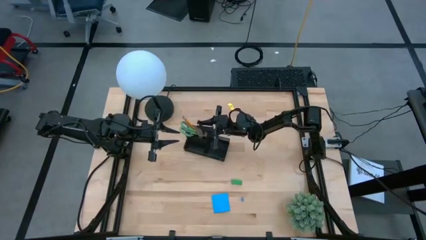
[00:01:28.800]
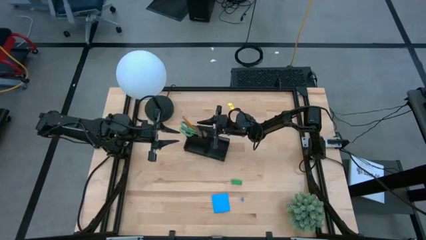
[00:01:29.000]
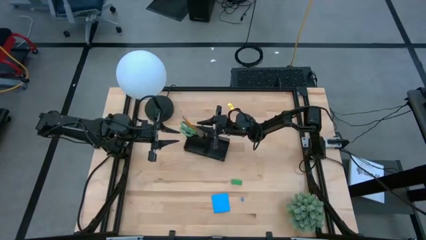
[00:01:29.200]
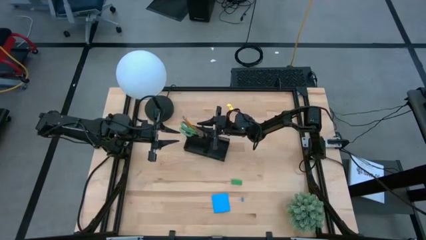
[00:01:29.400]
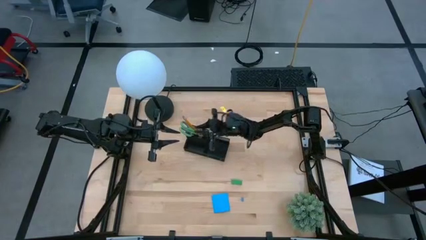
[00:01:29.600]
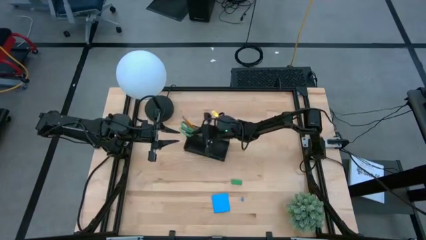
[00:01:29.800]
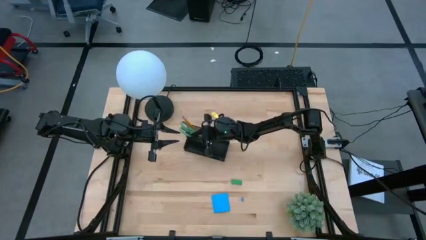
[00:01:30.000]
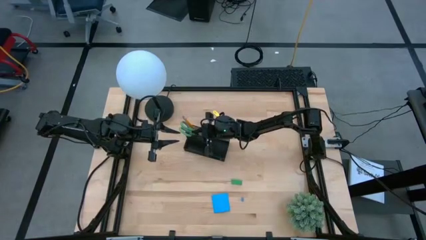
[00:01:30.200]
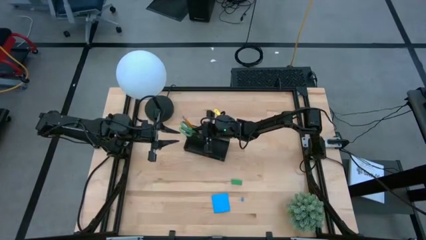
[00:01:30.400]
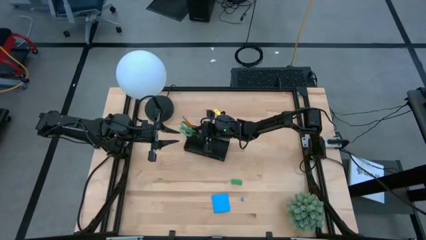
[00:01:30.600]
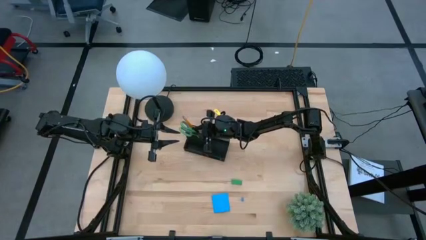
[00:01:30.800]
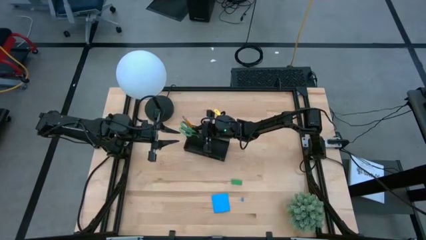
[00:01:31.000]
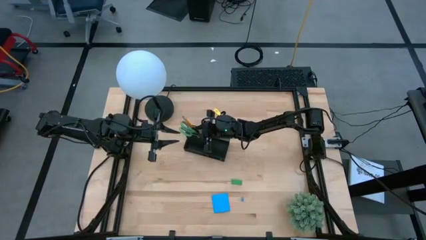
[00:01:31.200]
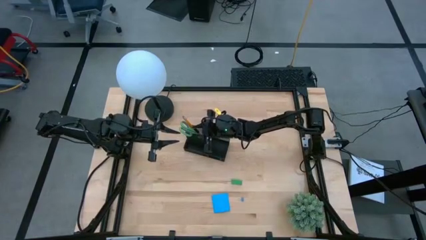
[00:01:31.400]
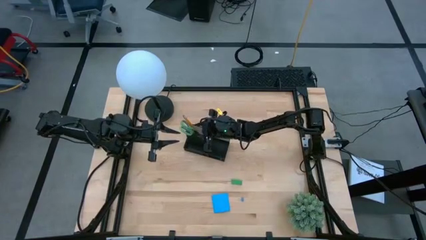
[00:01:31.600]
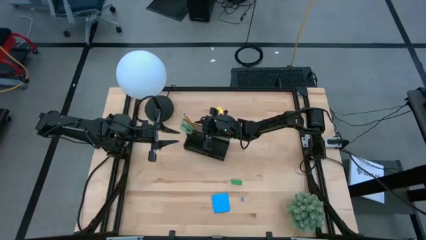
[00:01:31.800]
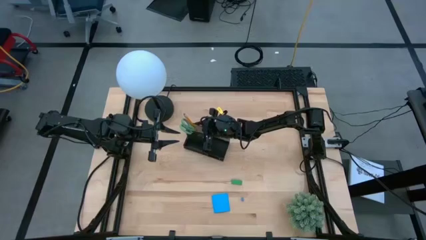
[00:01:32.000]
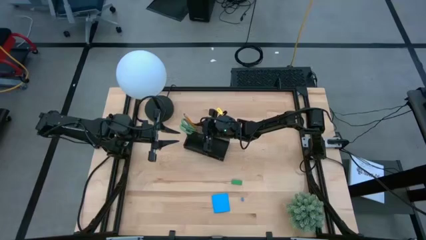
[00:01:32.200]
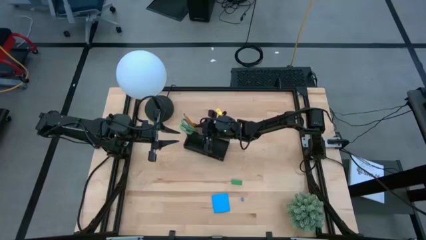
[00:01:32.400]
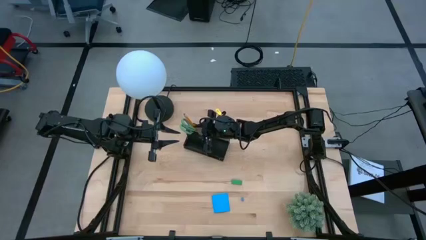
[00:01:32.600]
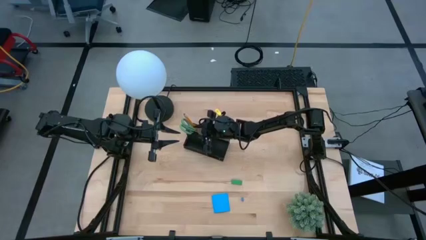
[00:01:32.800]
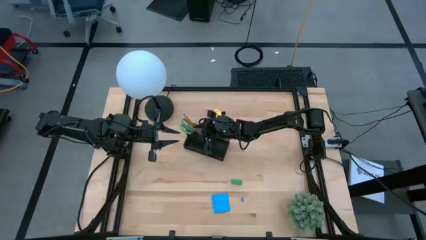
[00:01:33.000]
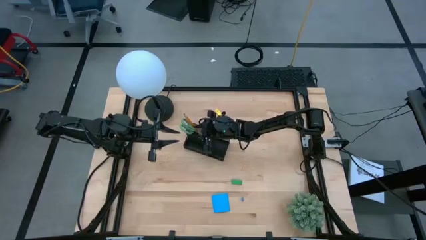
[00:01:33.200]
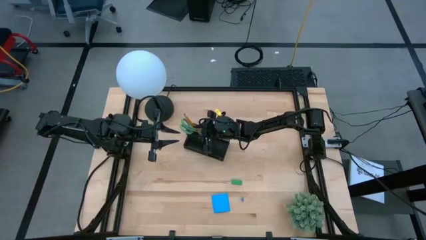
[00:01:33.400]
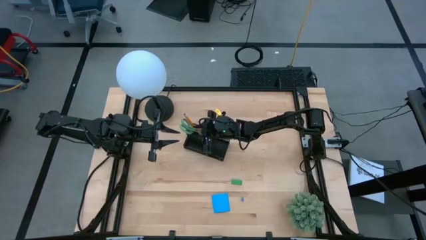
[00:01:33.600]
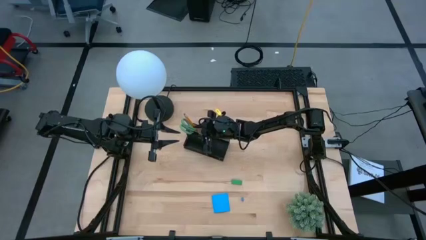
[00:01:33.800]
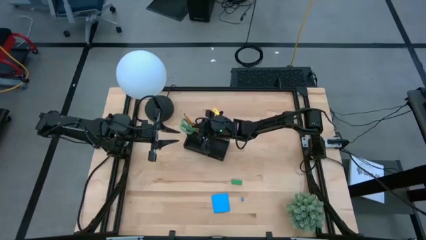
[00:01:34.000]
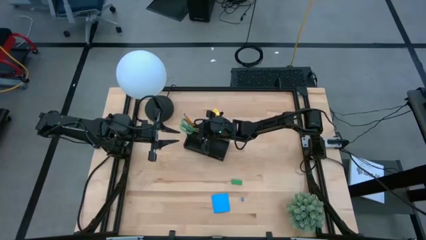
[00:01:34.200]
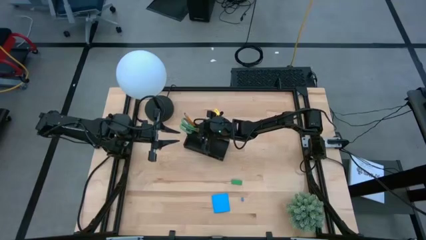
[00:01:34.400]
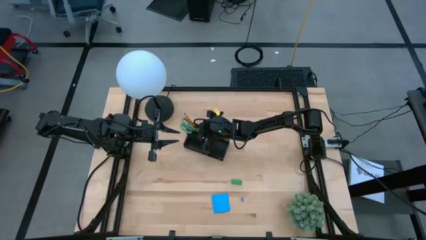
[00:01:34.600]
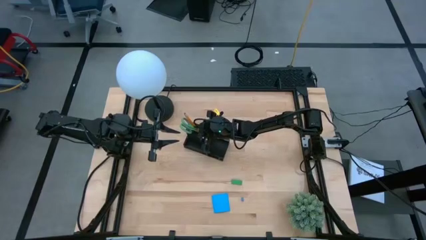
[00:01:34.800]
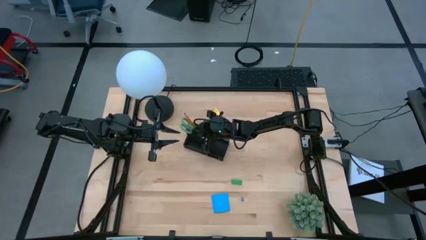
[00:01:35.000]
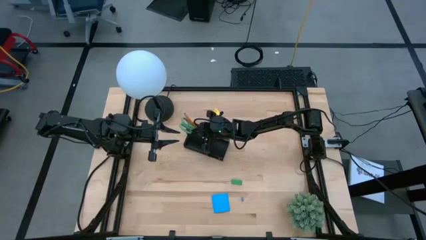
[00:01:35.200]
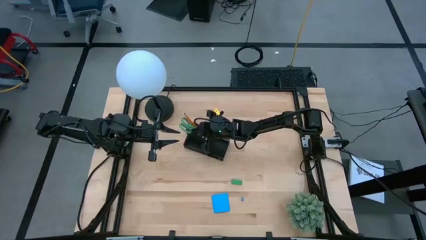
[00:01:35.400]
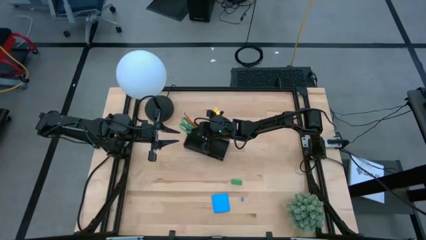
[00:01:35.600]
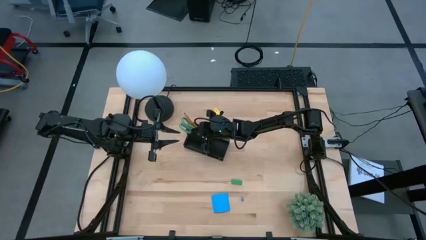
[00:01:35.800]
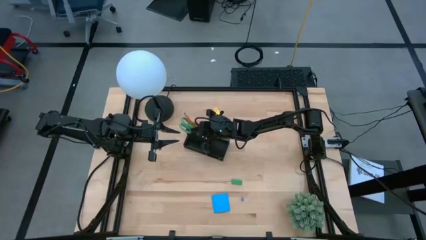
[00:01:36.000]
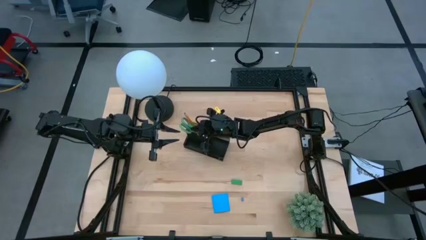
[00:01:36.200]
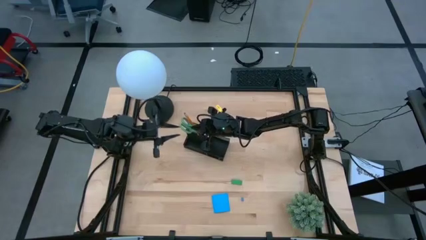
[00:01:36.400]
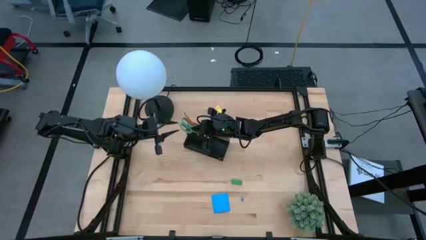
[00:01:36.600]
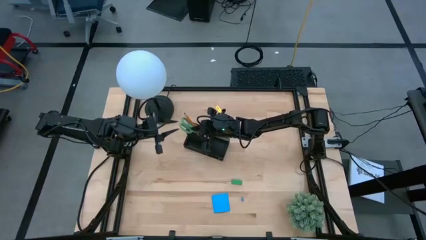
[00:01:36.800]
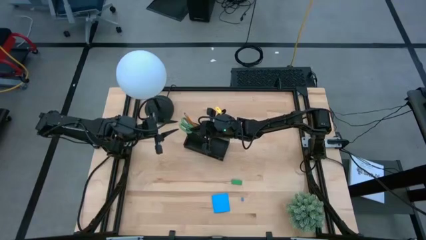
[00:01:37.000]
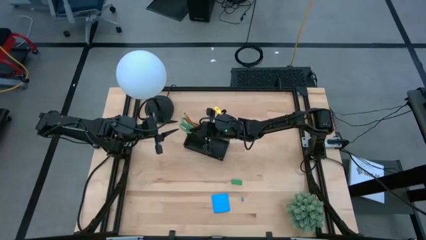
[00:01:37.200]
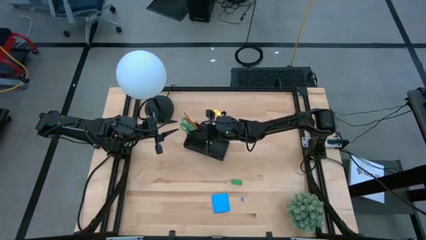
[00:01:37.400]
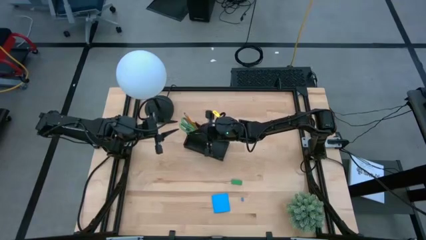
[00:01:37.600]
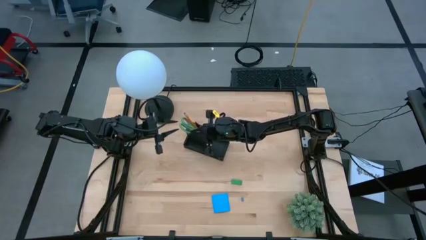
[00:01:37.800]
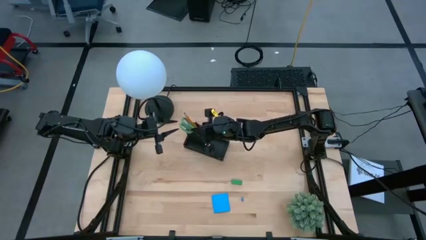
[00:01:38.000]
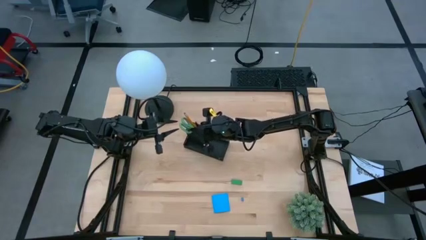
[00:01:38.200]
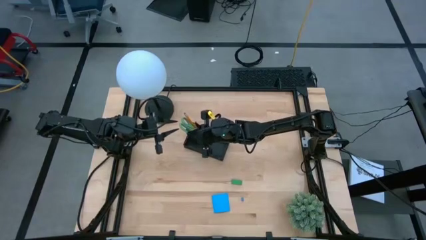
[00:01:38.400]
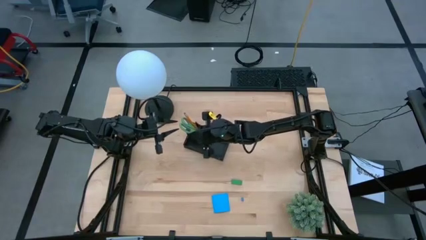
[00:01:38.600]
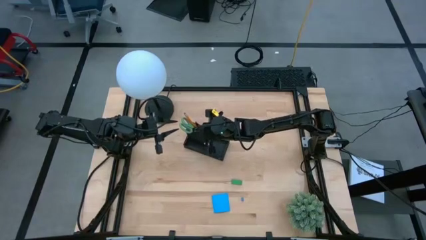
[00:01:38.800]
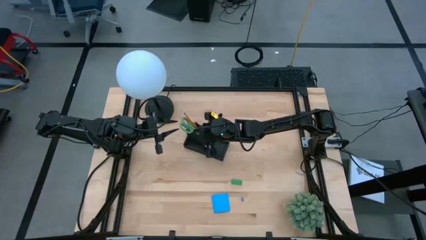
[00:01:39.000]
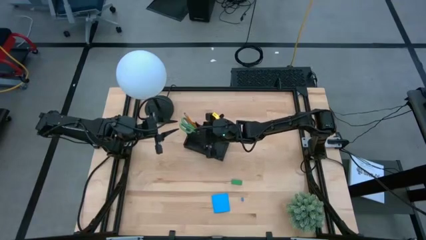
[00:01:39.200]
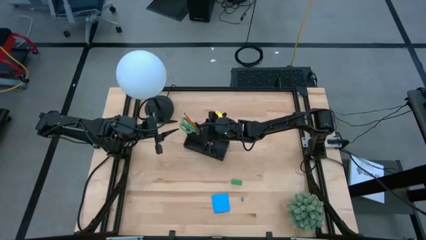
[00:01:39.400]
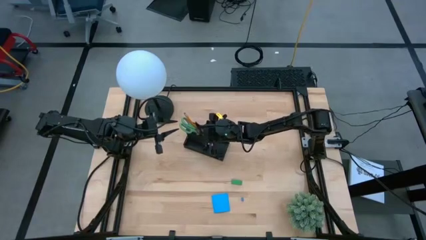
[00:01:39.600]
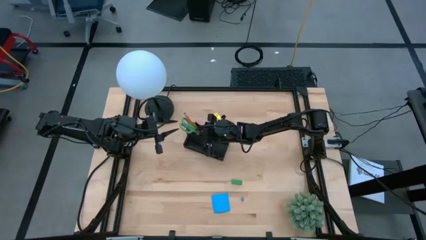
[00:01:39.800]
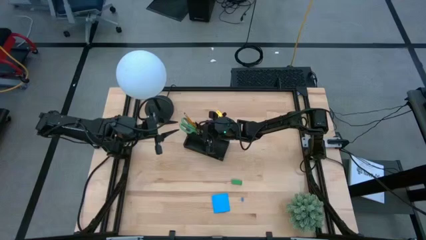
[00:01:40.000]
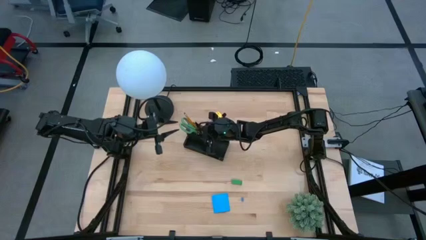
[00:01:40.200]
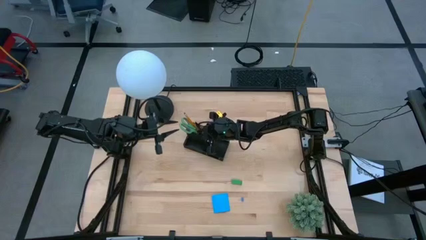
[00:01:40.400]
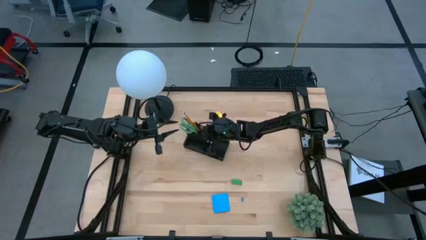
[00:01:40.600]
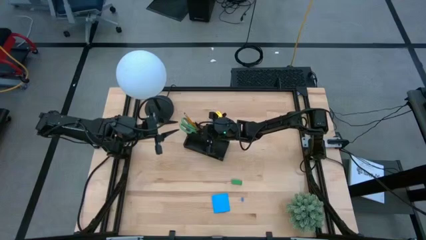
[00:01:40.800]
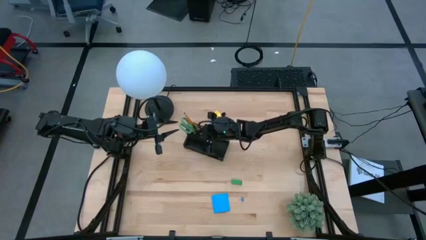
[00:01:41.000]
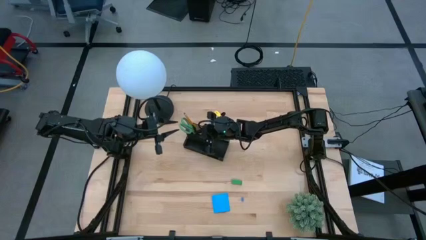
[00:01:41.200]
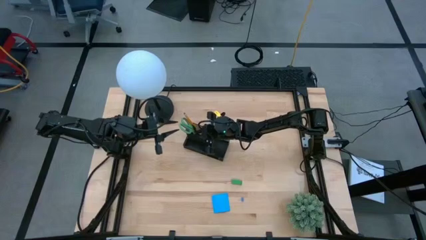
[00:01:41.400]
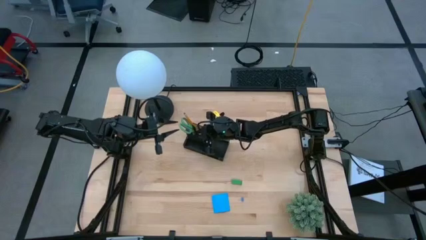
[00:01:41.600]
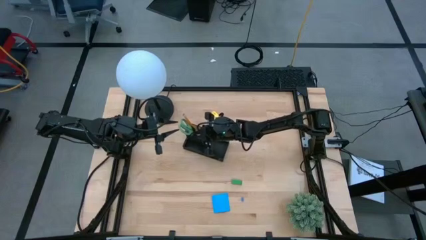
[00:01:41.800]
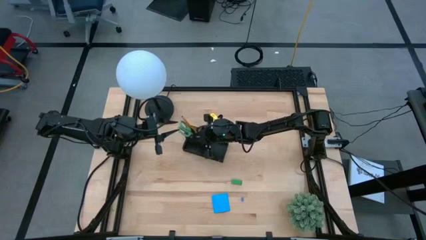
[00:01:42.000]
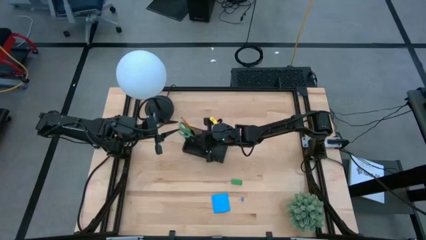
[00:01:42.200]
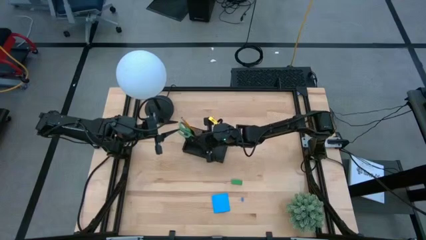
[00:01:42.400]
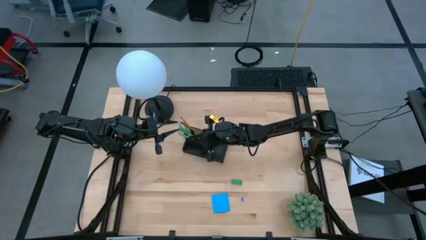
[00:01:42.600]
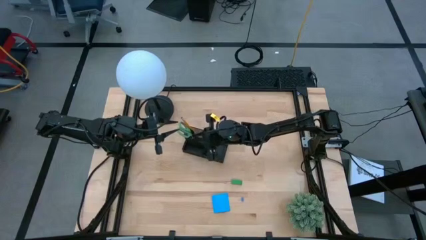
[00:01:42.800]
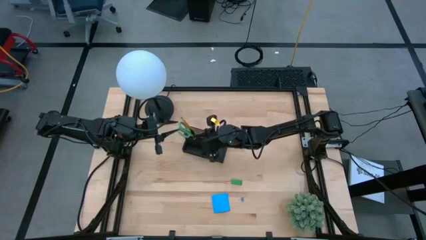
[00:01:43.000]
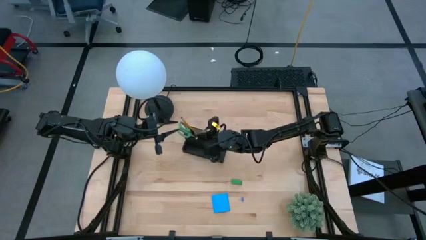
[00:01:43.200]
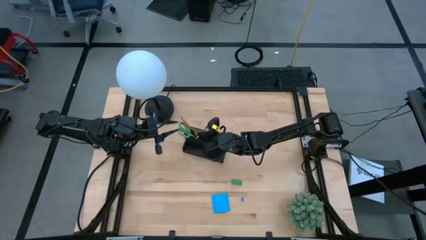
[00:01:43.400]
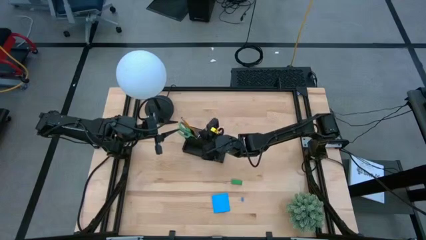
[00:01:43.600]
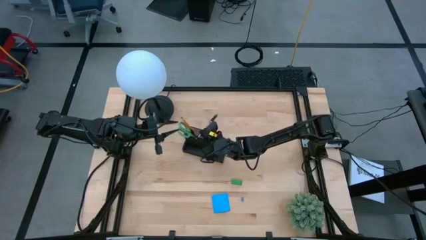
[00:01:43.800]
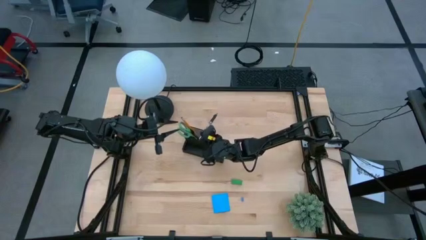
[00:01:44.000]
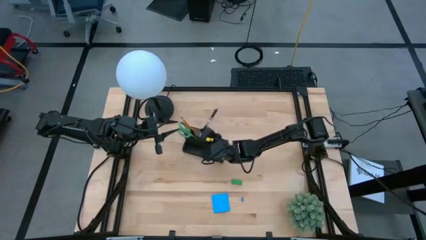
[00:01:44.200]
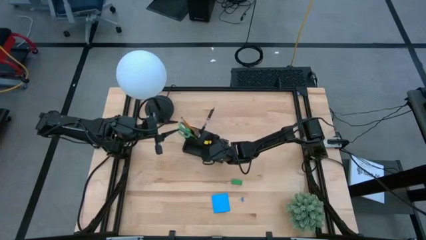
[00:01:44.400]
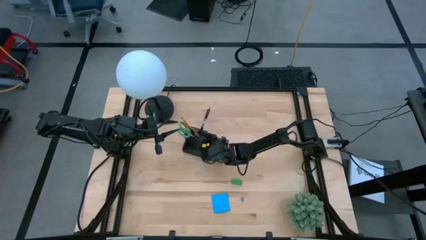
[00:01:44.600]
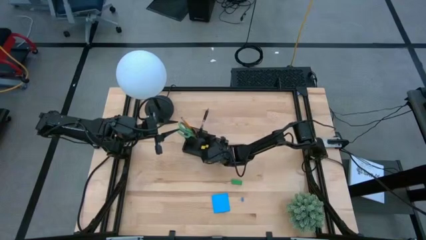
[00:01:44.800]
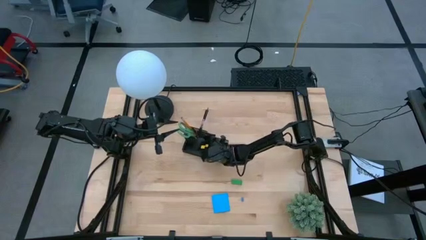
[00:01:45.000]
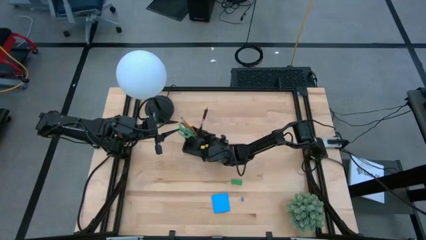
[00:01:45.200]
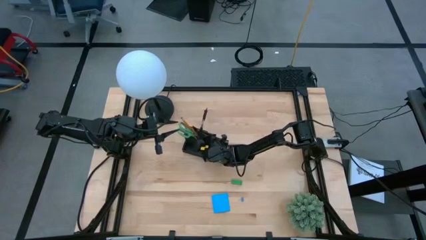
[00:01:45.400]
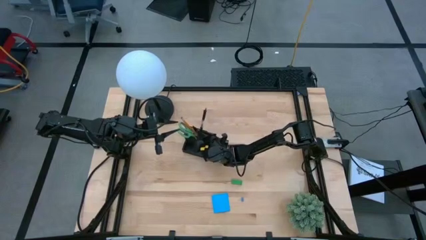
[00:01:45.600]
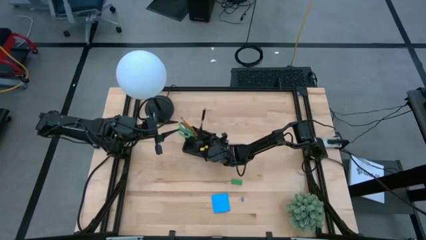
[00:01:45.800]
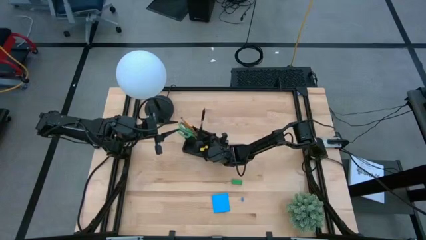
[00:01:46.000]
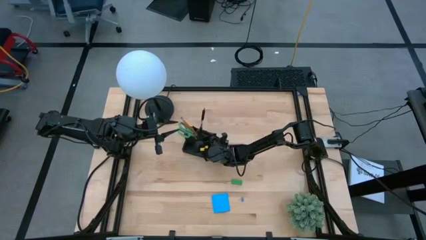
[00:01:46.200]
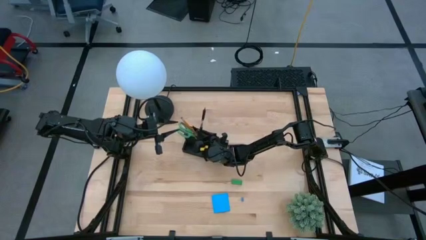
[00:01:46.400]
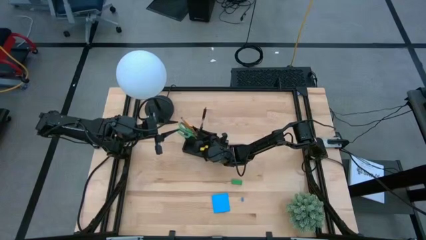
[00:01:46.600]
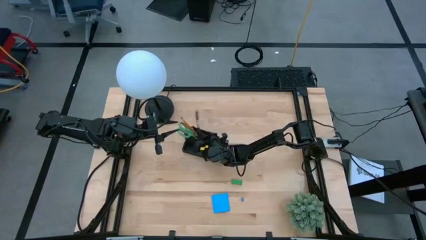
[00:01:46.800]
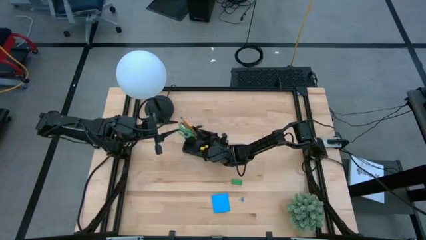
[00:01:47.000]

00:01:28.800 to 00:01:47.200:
Task: Pick and place office supplies into organizer
Adjust the black pen in the desk organizer
